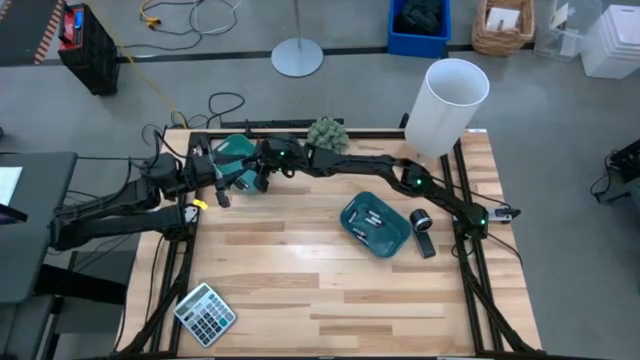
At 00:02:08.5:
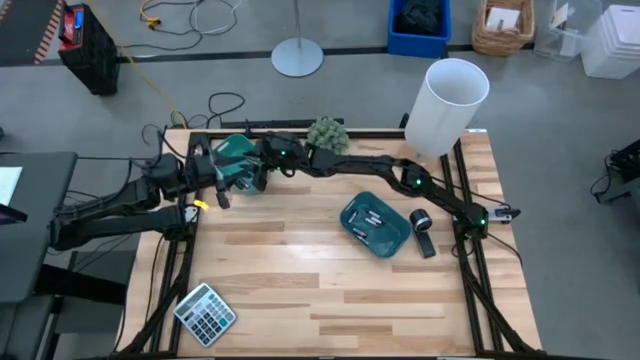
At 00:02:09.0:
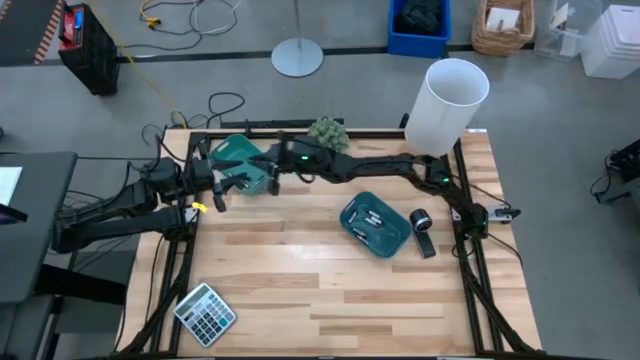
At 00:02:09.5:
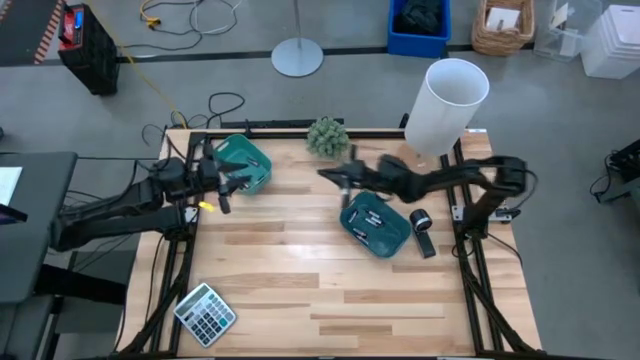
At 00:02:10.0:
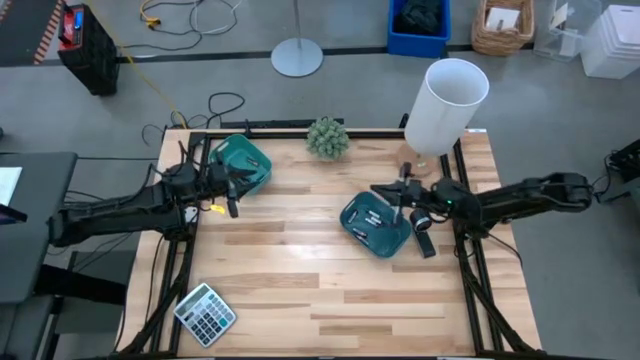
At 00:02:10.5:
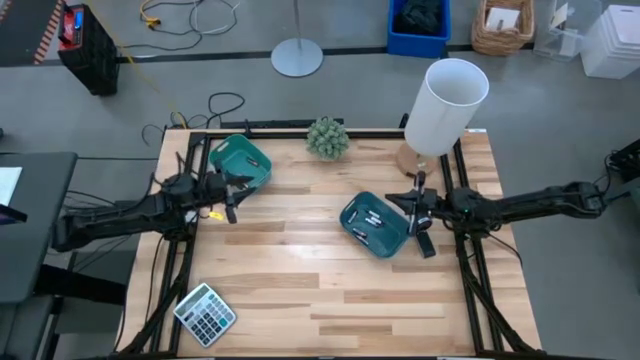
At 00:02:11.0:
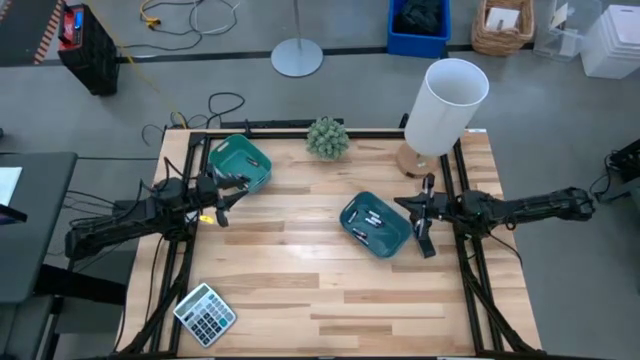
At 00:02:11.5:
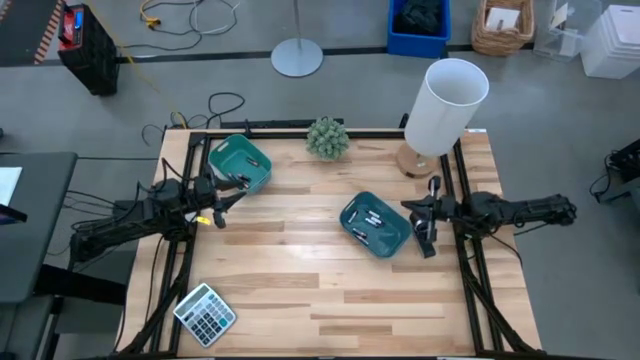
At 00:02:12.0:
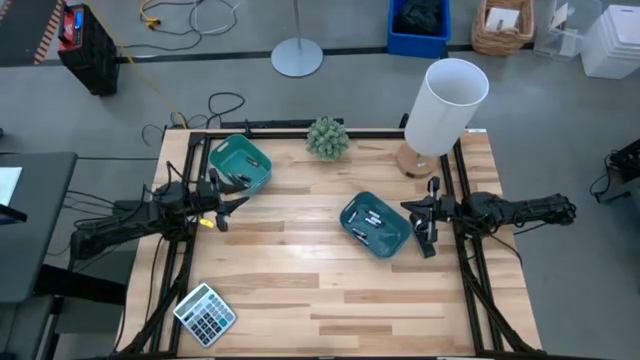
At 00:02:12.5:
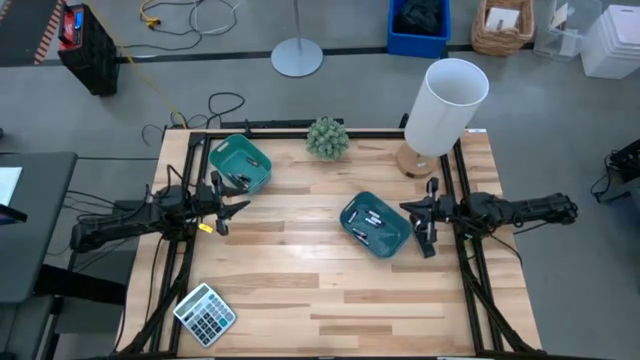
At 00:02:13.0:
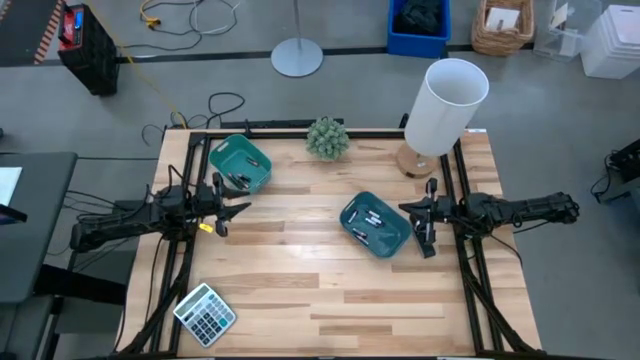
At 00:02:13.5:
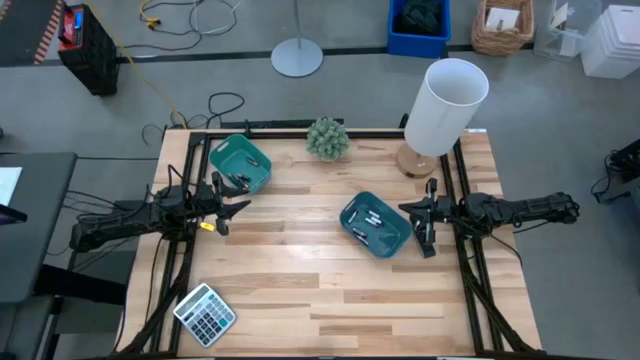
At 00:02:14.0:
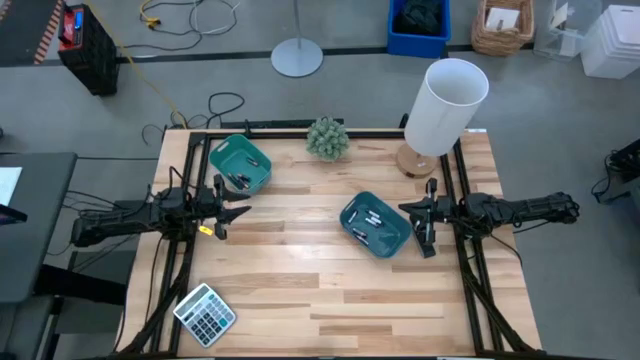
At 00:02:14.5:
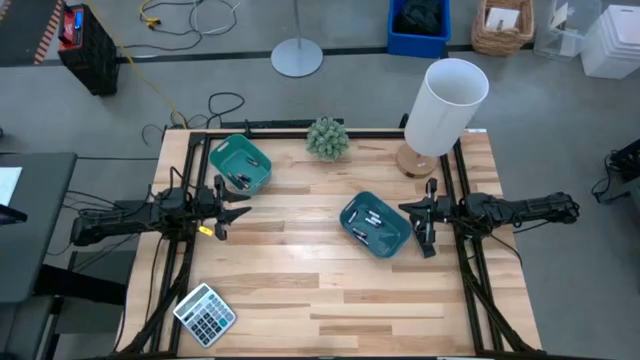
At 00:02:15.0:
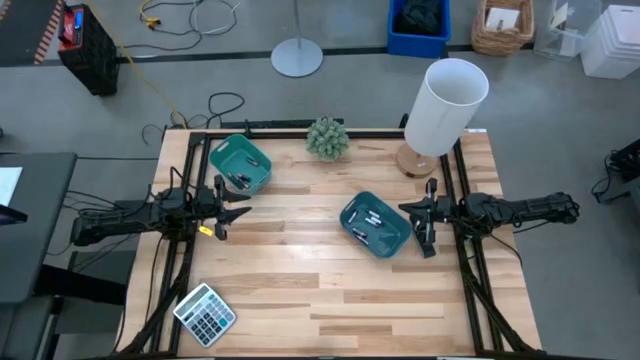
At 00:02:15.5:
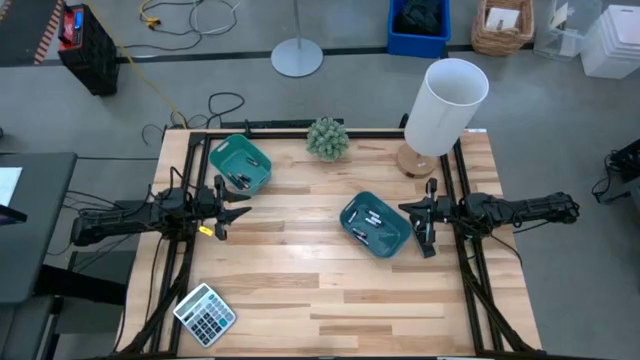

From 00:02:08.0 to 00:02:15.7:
Task: Sort batteries
Return to Home Position

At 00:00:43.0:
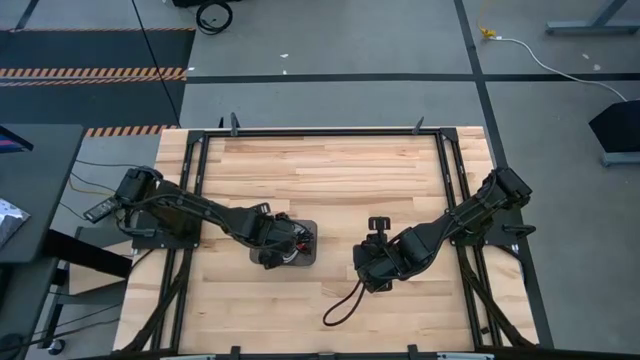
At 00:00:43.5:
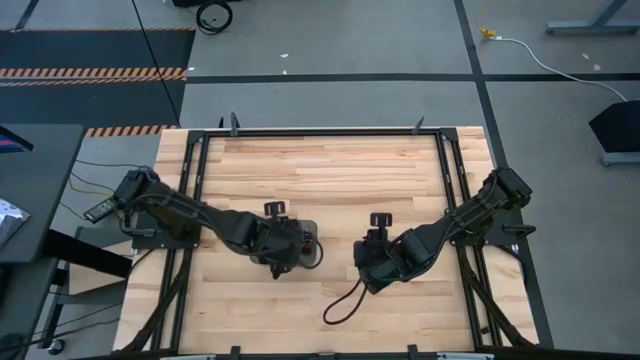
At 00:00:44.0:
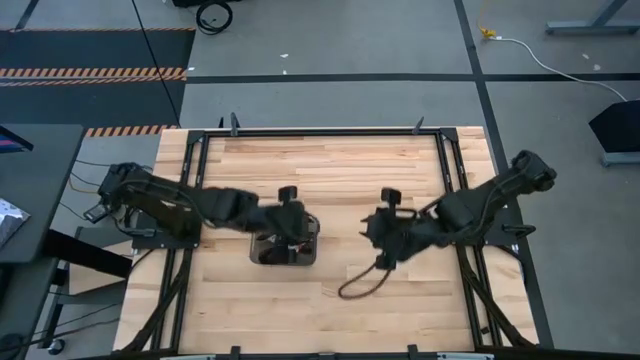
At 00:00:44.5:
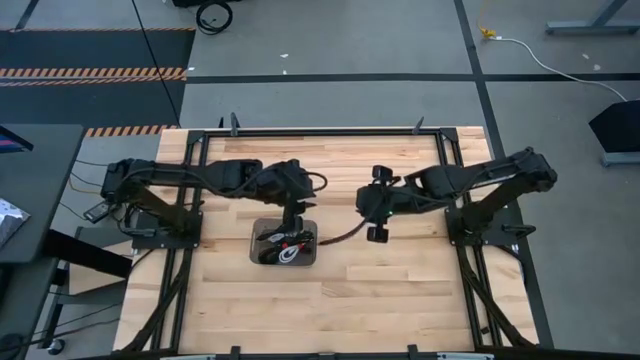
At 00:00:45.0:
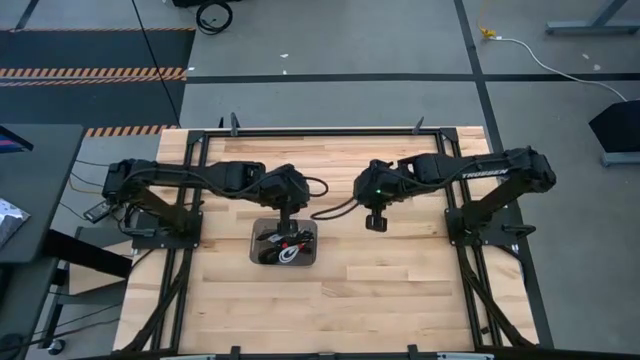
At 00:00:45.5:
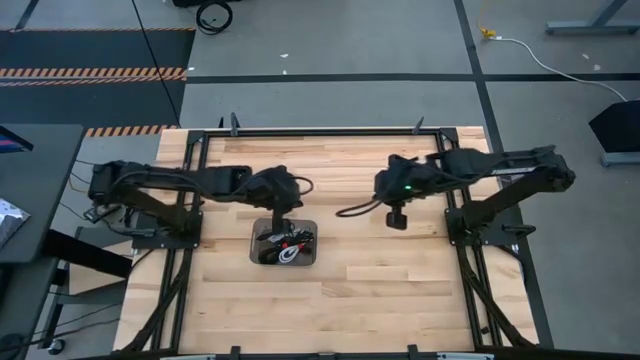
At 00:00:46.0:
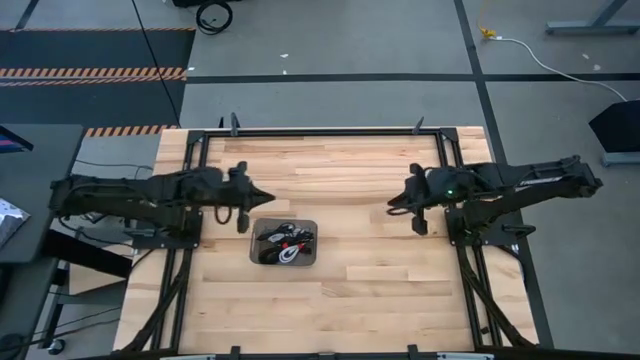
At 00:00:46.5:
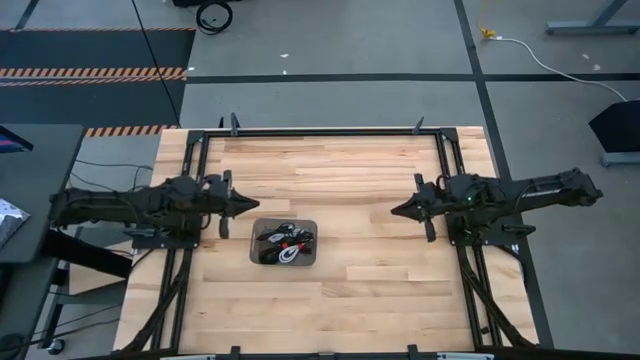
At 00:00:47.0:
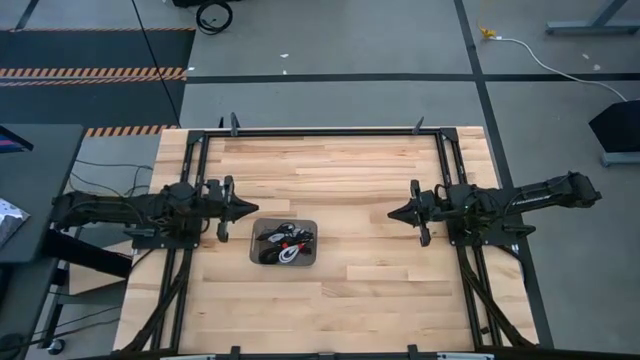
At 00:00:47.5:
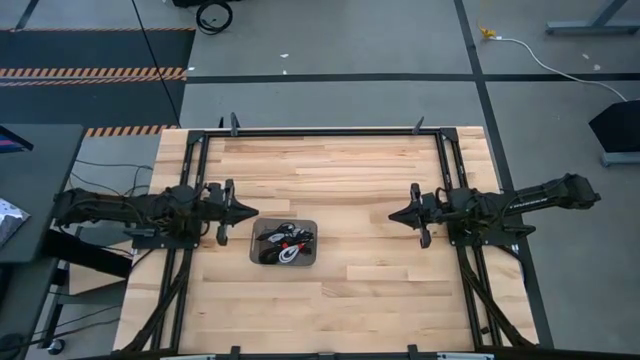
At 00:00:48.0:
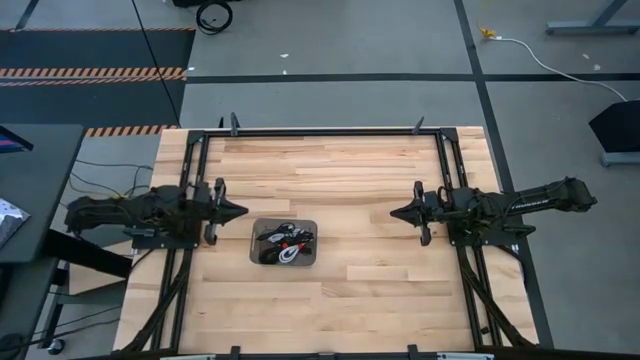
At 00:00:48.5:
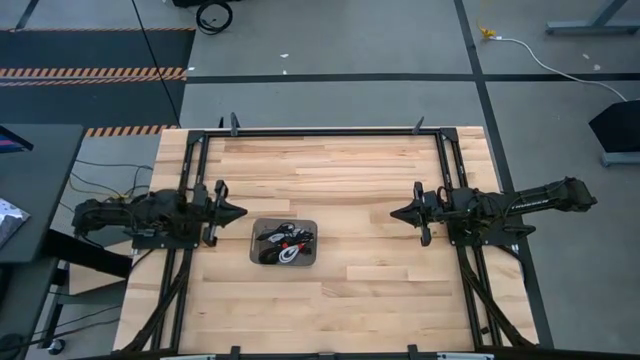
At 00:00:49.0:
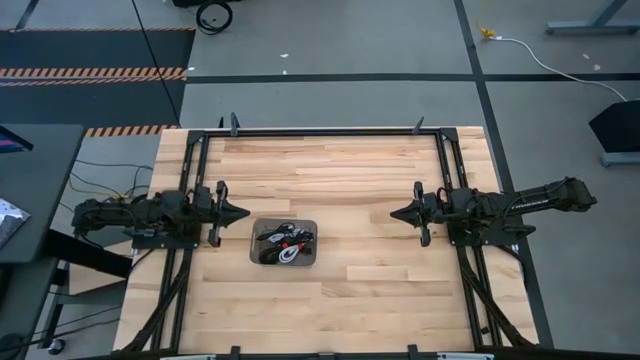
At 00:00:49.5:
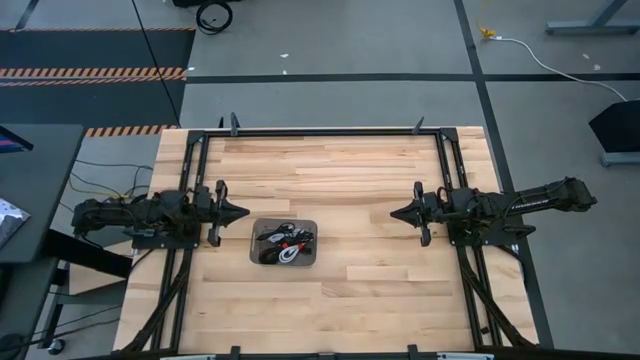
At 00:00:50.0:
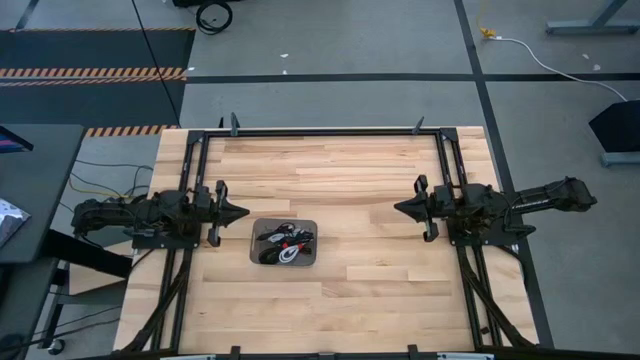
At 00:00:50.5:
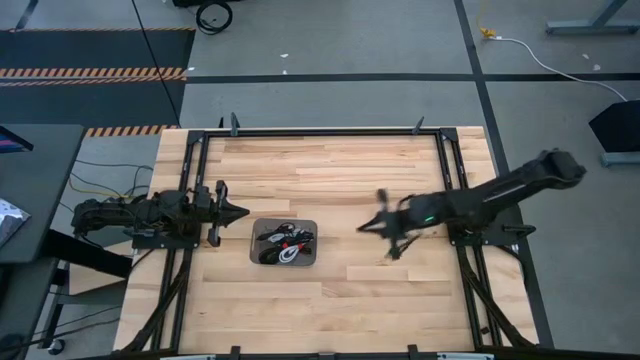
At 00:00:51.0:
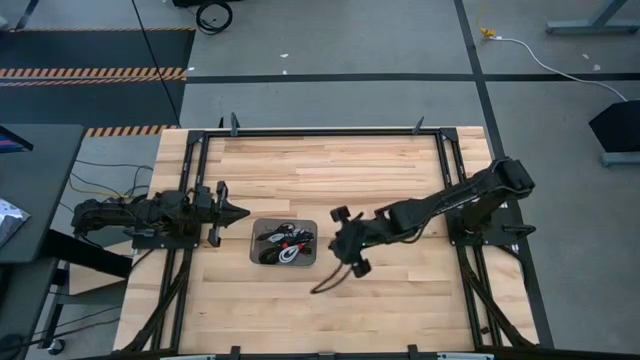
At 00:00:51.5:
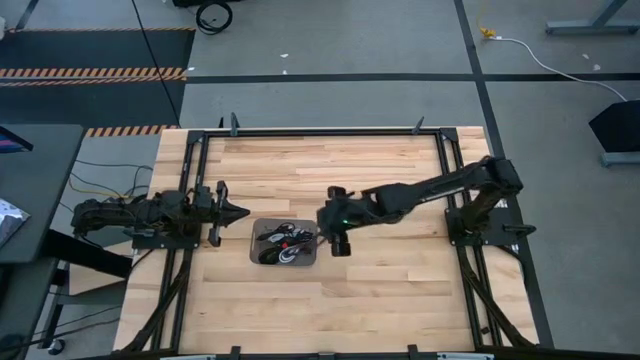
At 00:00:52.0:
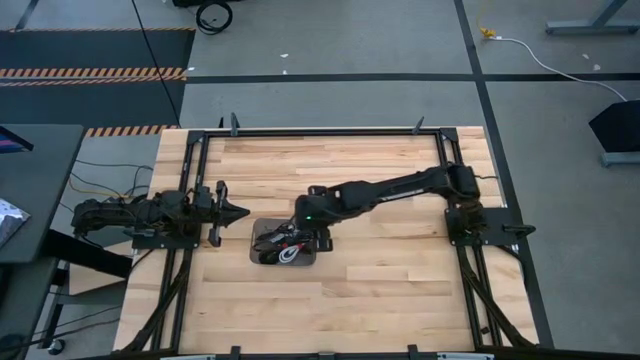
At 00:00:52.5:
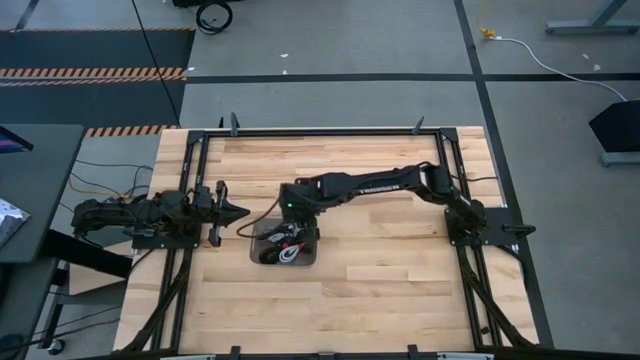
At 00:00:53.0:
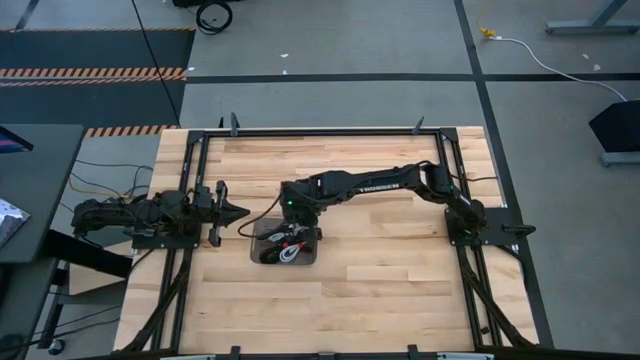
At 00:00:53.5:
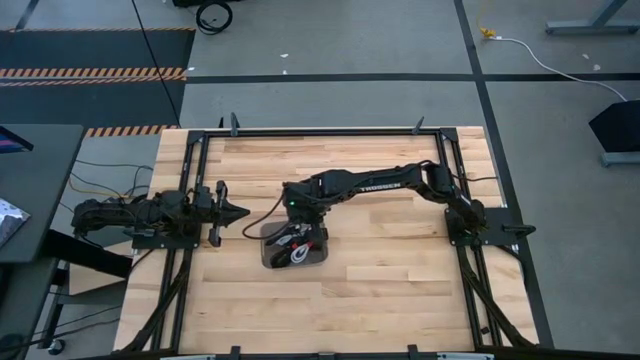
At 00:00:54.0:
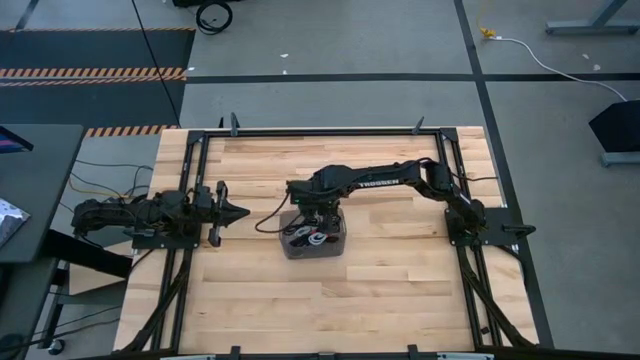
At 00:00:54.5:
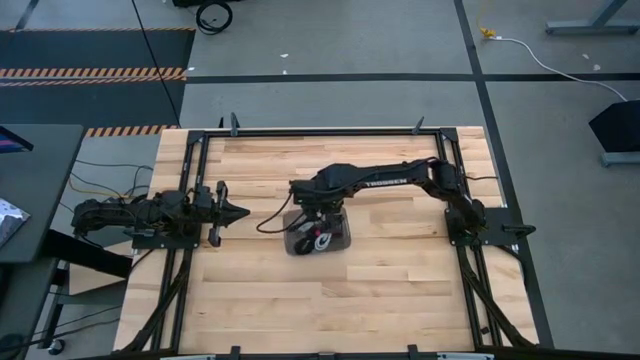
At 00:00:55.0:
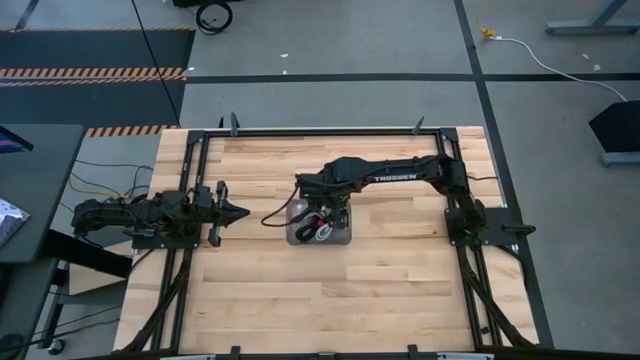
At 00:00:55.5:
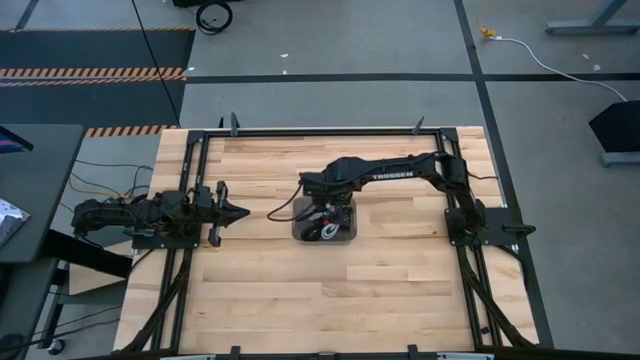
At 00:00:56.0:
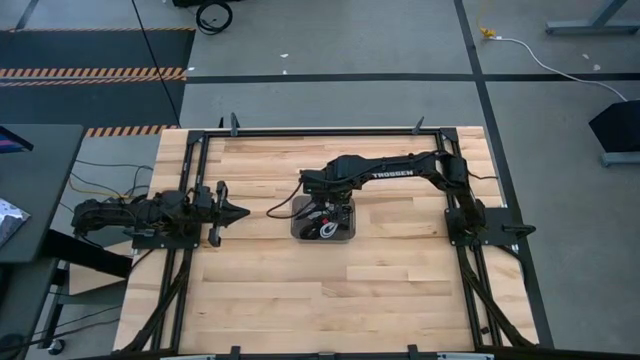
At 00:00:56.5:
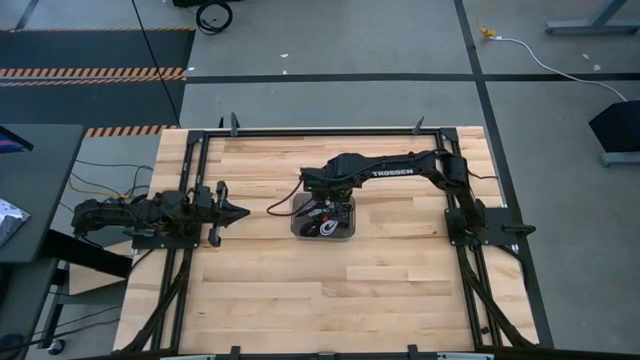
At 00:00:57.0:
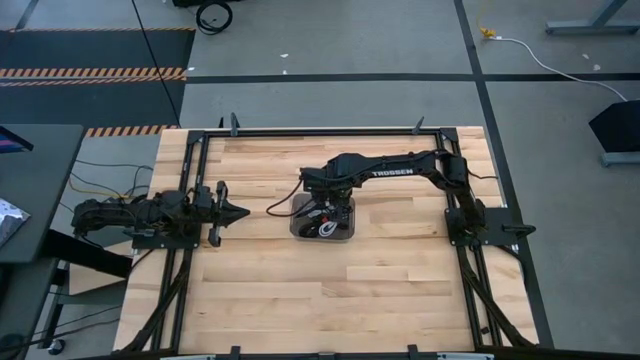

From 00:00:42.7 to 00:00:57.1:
Task: Pick and place USB-C Cables
Move the black bin to the center of the table
